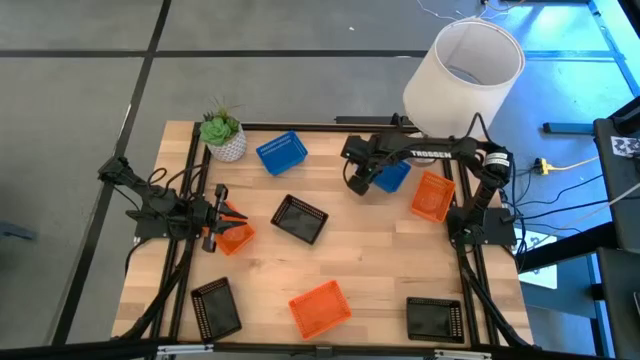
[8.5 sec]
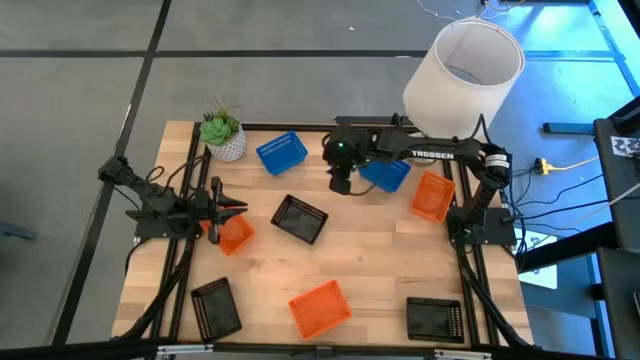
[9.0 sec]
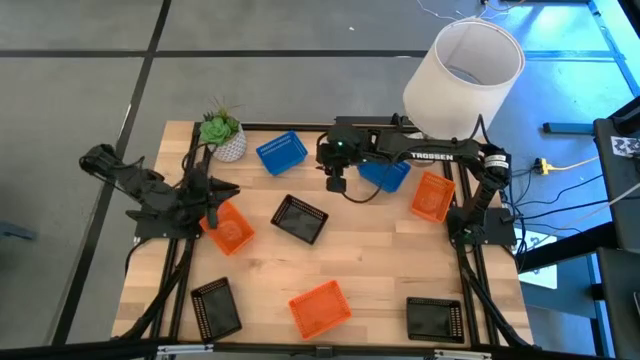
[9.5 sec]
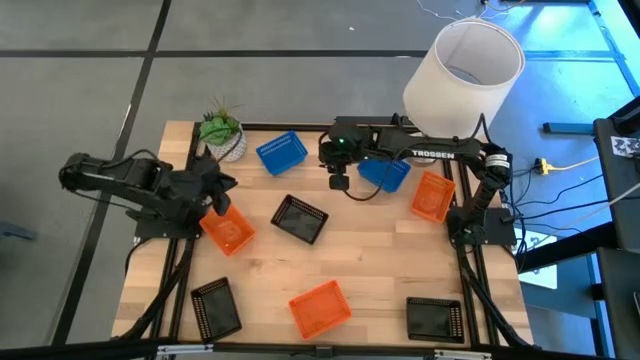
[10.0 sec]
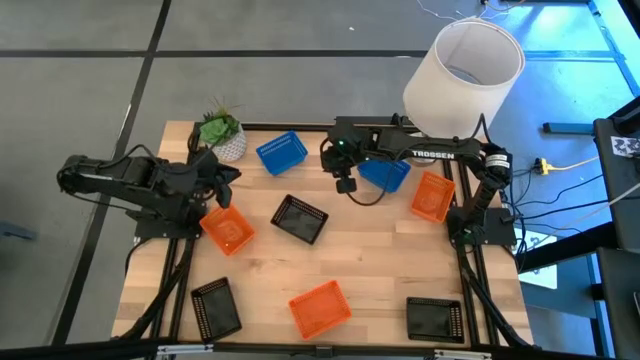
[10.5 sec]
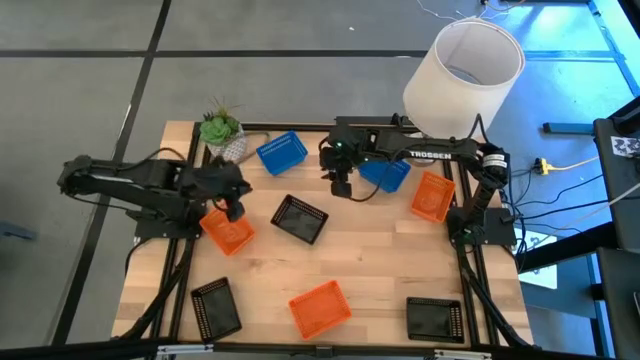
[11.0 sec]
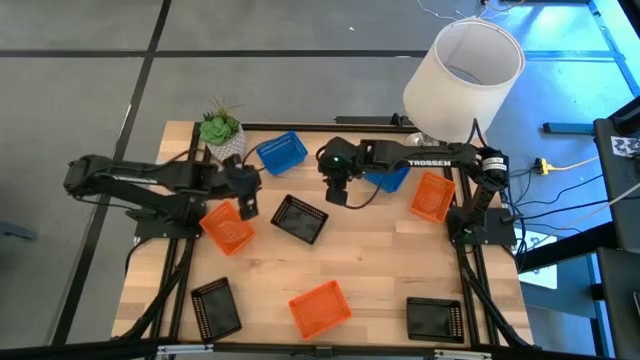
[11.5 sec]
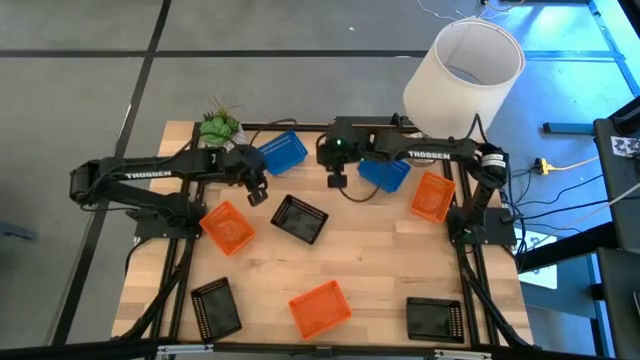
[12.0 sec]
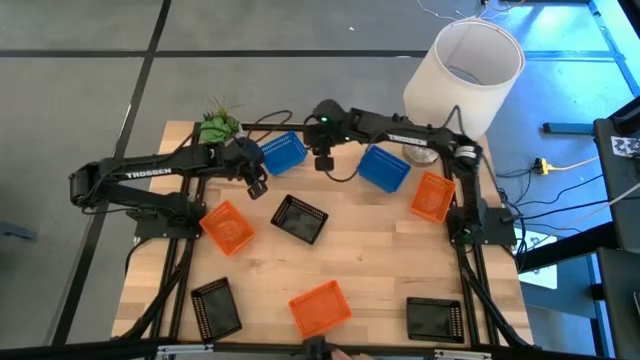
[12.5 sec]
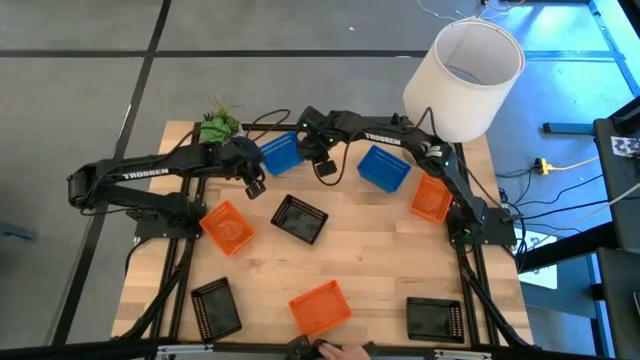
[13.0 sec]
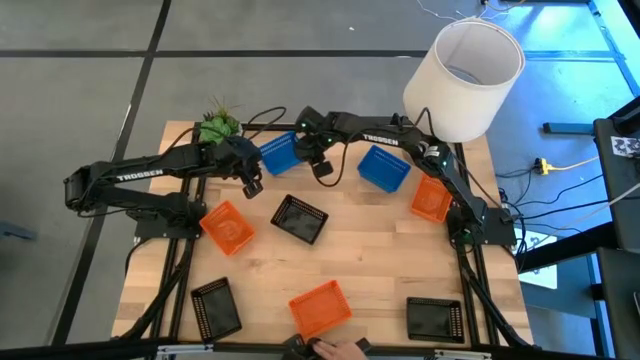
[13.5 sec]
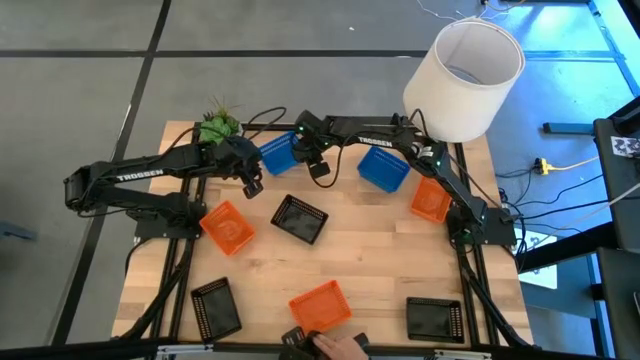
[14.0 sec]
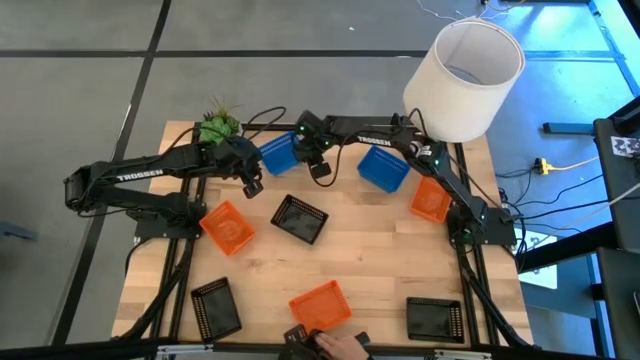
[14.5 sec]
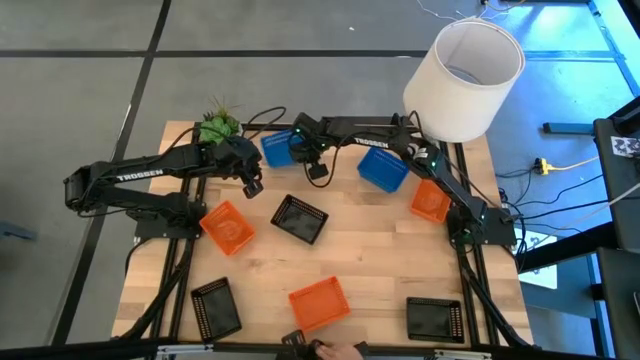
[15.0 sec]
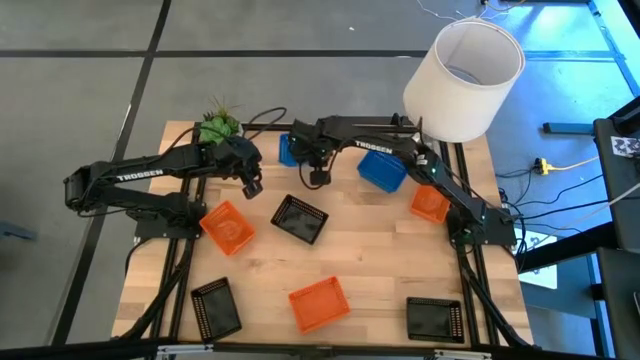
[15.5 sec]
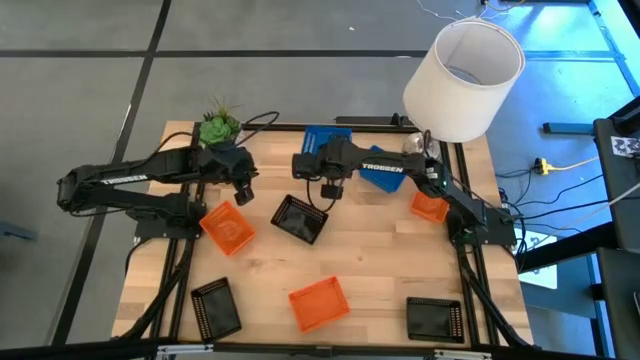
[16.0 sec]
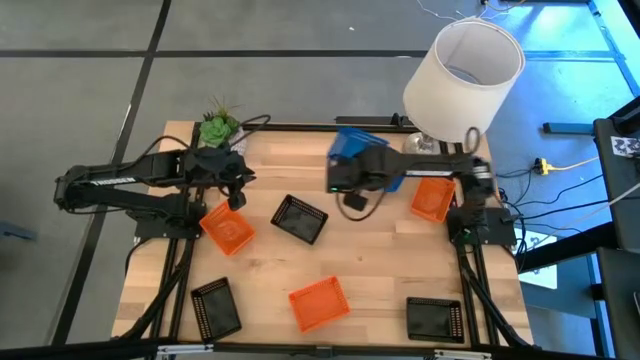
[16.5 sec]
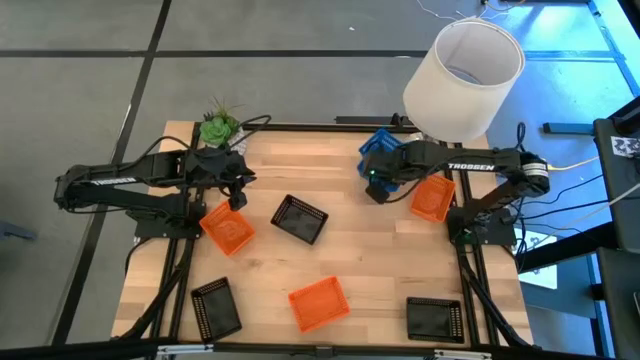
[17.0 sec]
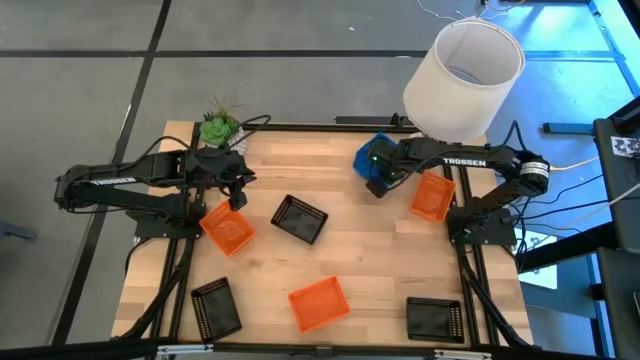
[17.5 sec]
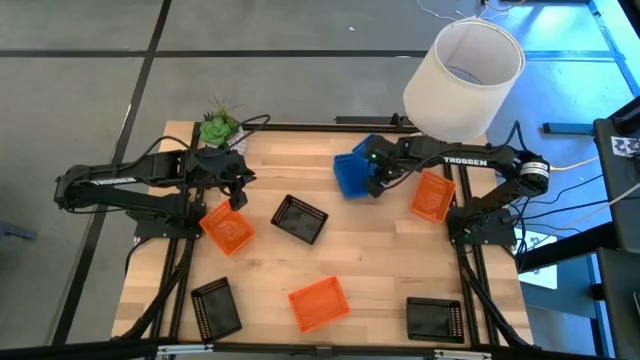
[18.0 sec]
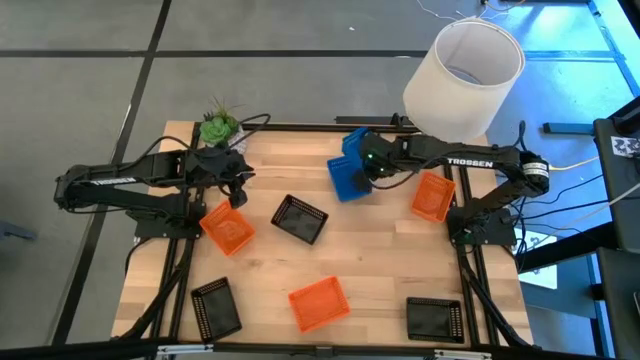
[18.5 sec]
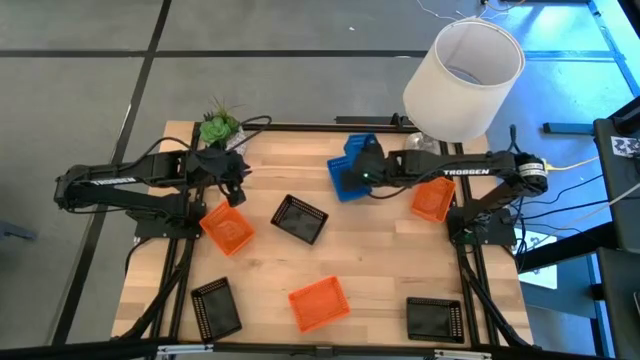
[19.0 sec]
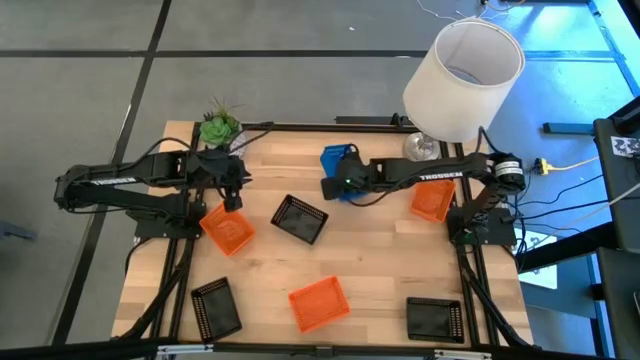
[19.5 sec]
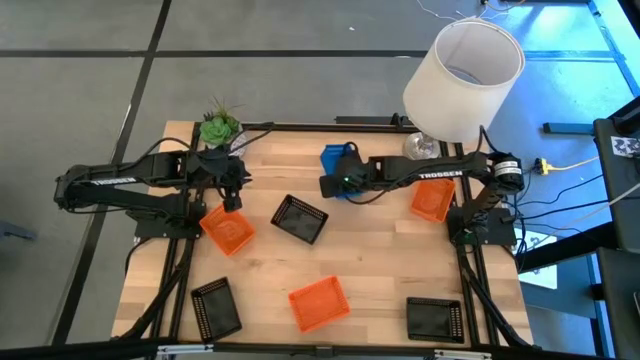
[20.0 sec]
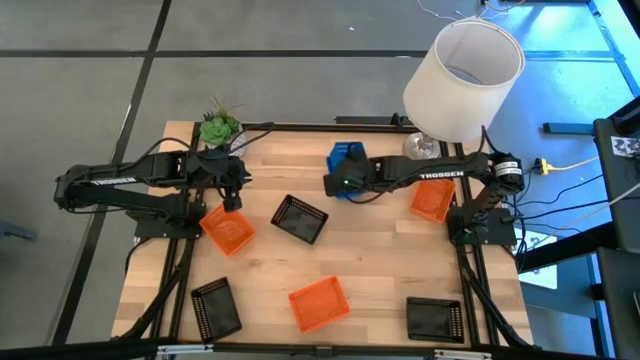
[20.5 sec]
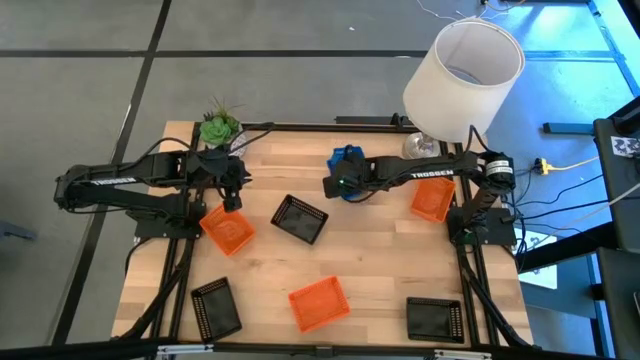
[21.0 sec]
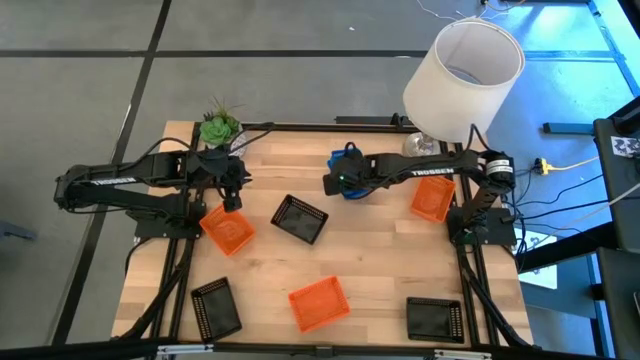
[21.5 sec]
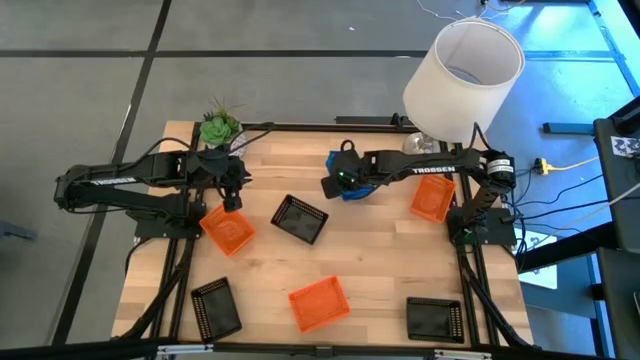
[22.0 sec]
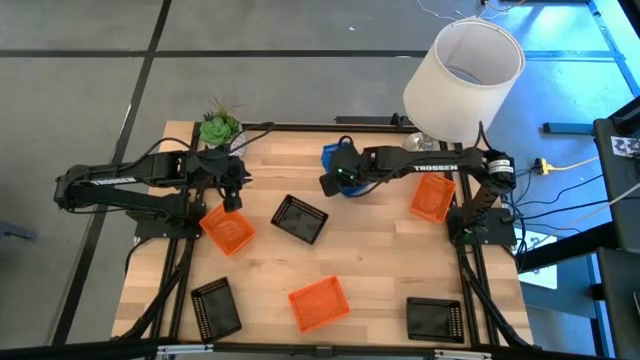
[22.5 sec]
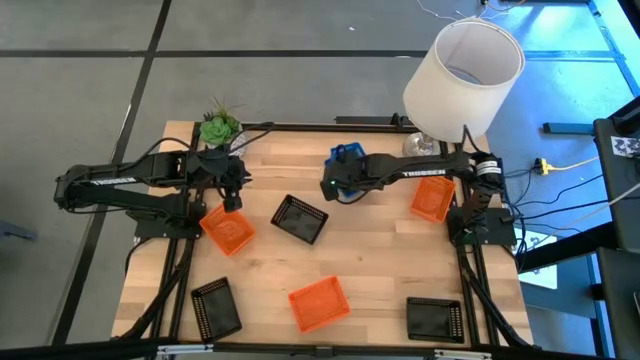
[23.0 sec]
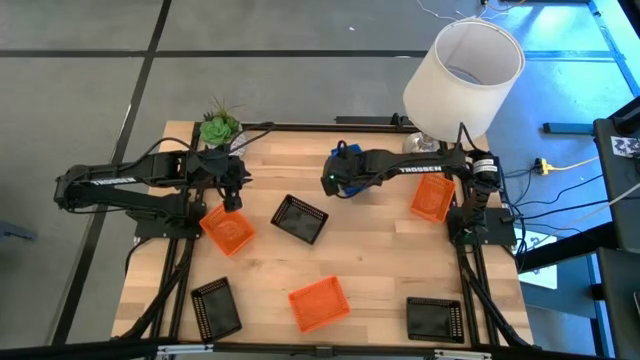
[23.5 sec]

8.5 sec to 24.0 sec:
Stack the left blue bin on the blue bin
